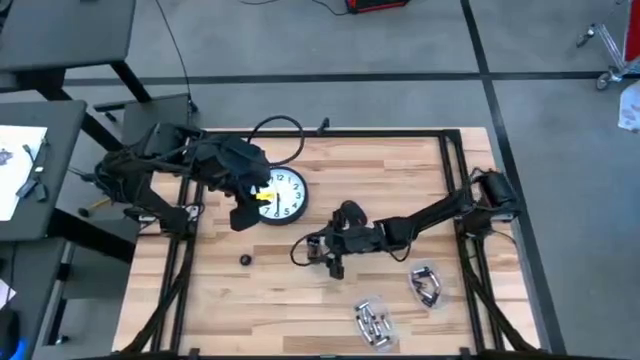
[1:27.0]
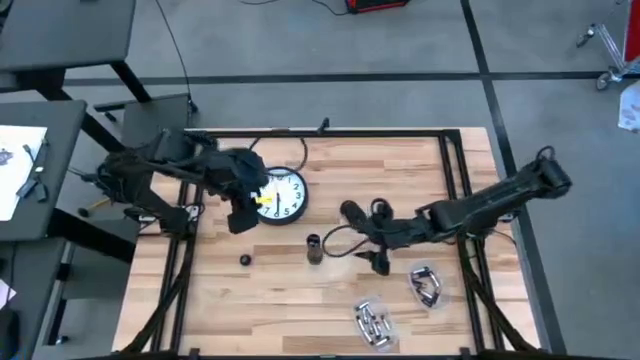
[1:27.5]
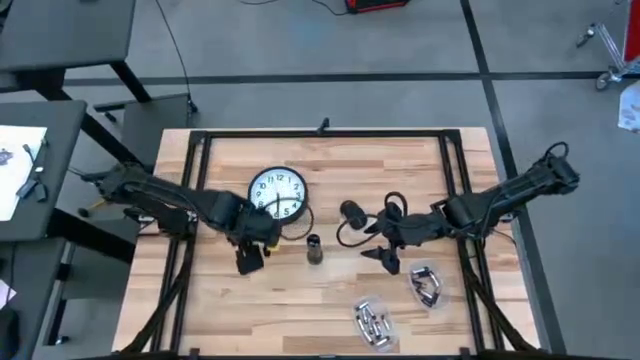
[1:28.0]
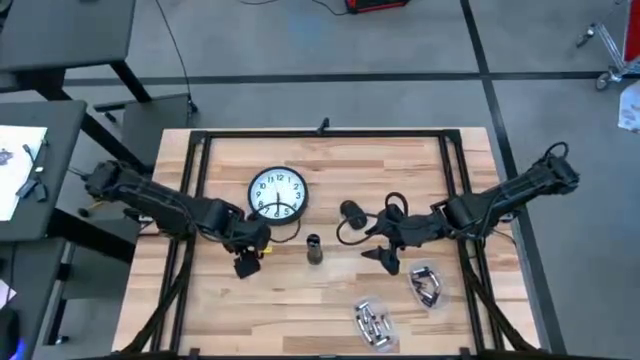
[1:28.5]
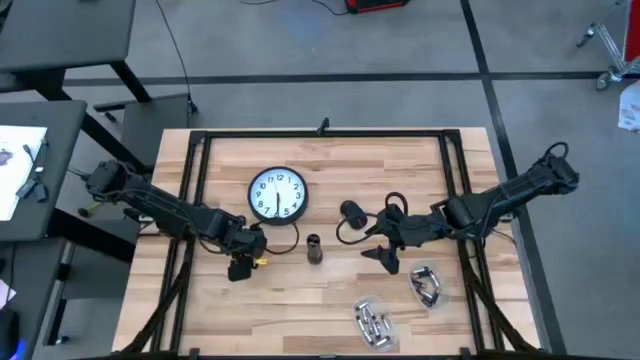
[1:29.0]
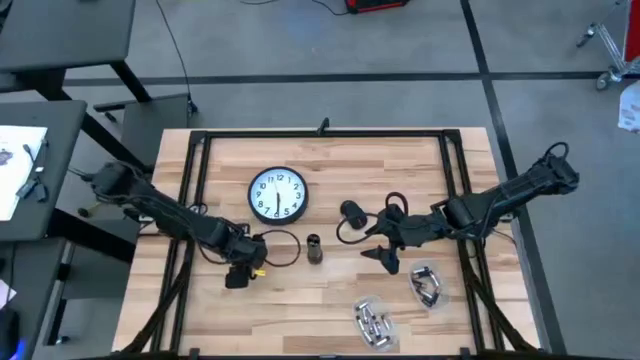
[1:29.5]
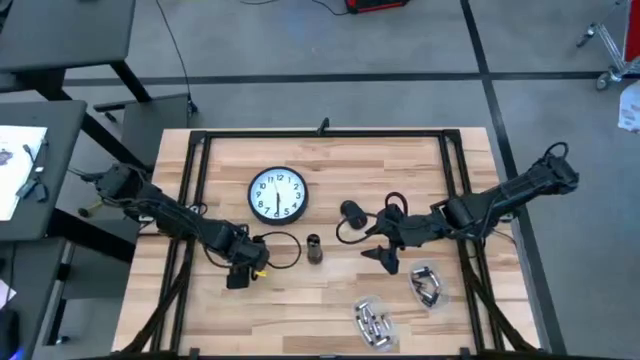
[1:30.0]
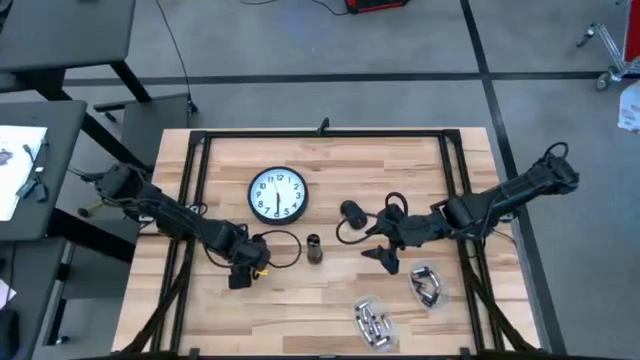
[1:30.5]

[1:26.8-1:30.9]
Task: Insert battery
Close the black flashlight battery compartment

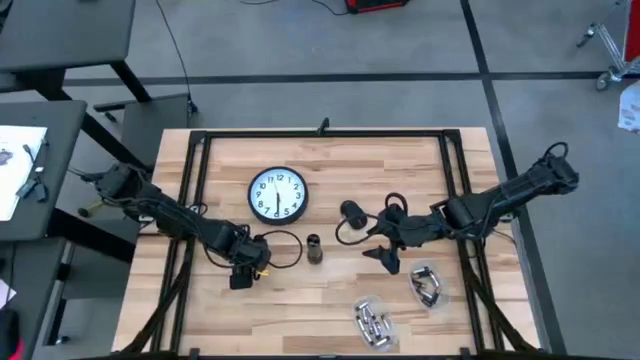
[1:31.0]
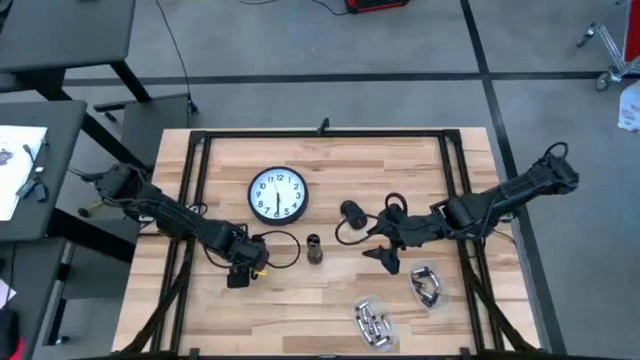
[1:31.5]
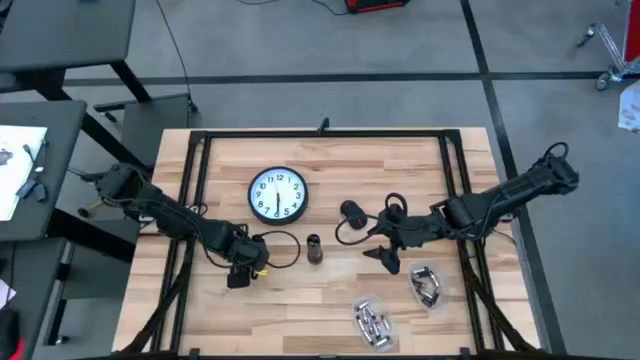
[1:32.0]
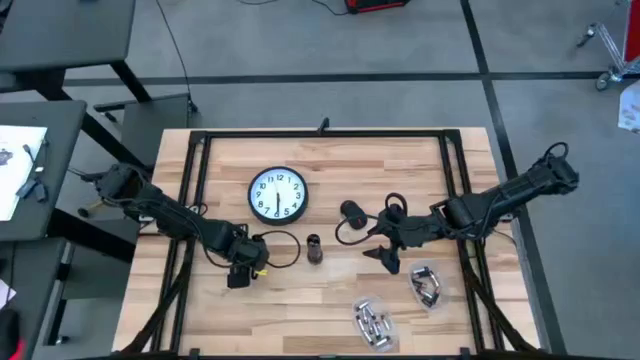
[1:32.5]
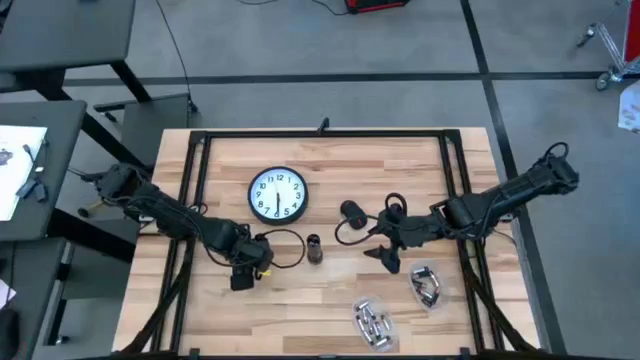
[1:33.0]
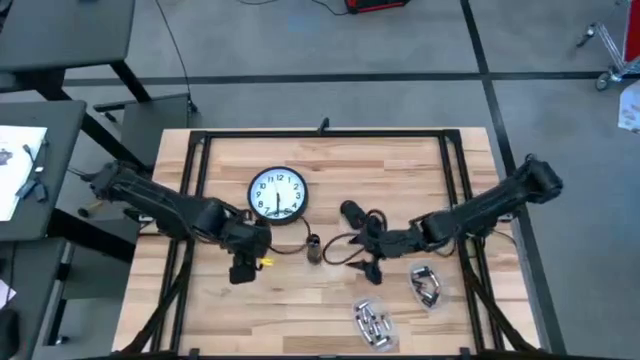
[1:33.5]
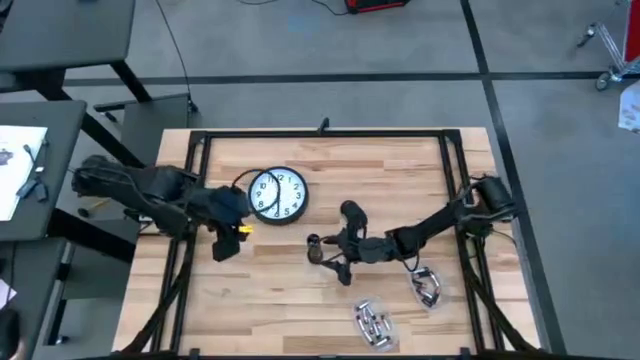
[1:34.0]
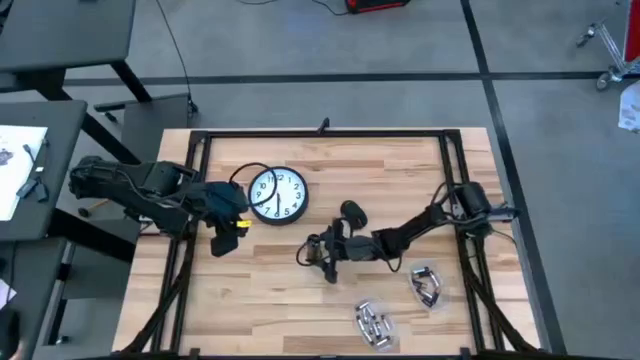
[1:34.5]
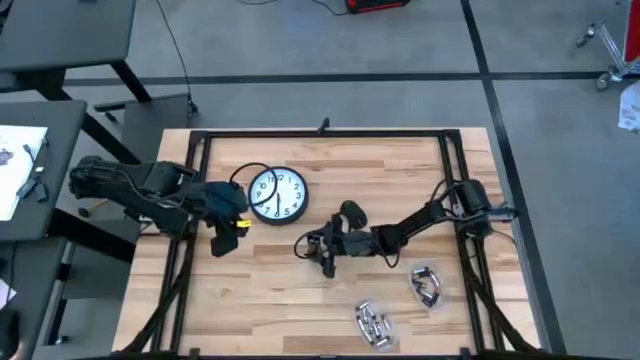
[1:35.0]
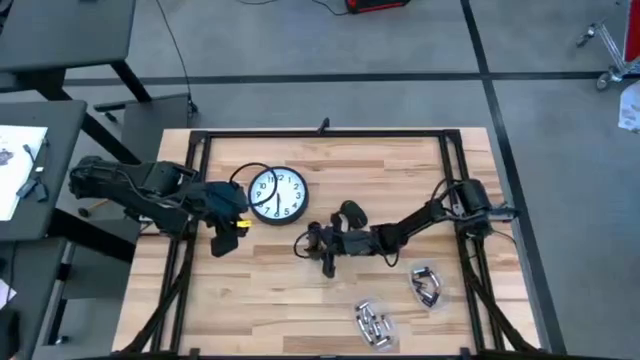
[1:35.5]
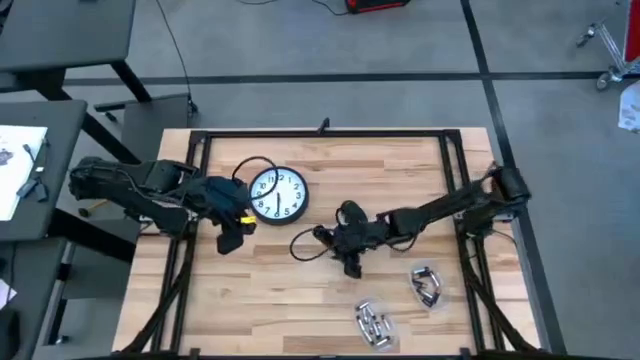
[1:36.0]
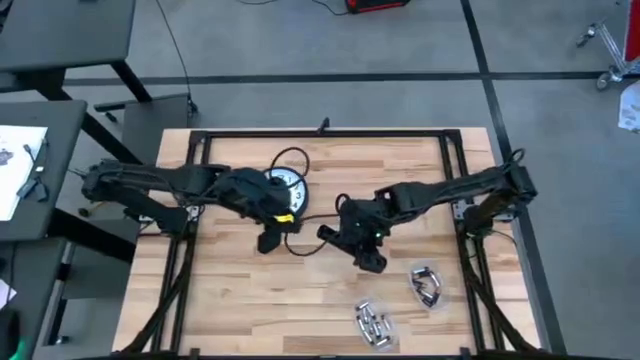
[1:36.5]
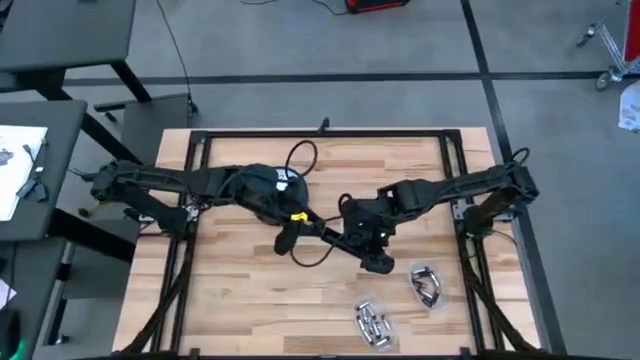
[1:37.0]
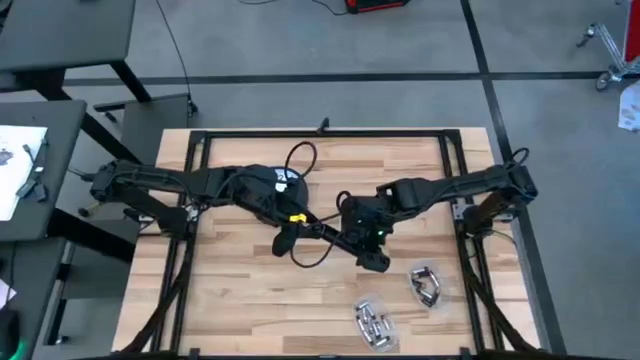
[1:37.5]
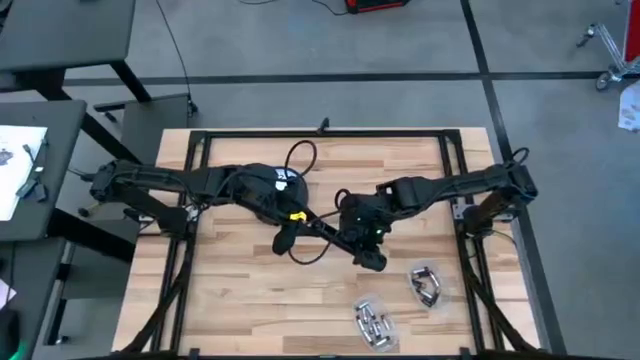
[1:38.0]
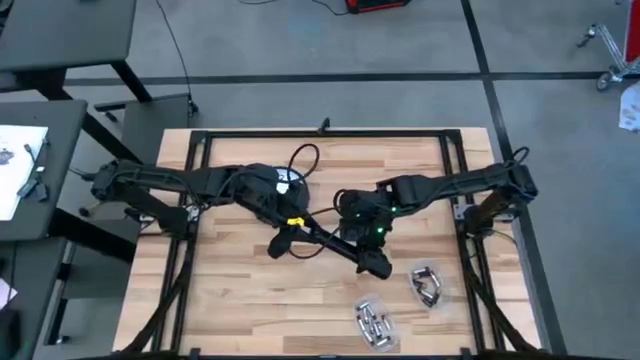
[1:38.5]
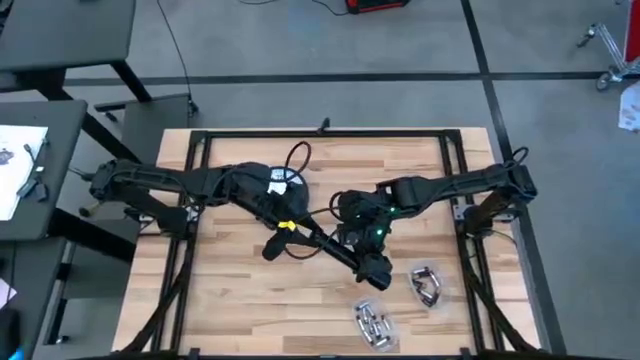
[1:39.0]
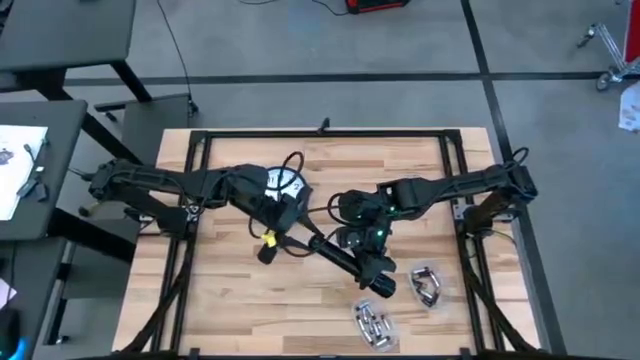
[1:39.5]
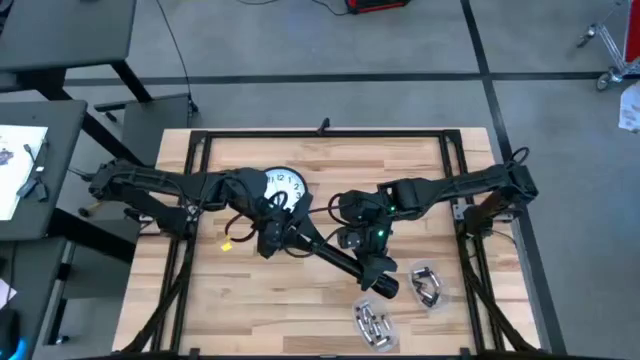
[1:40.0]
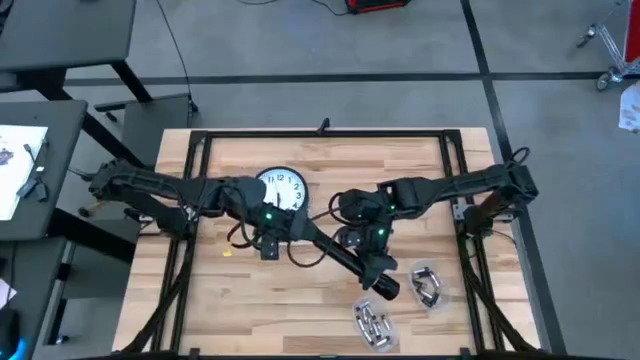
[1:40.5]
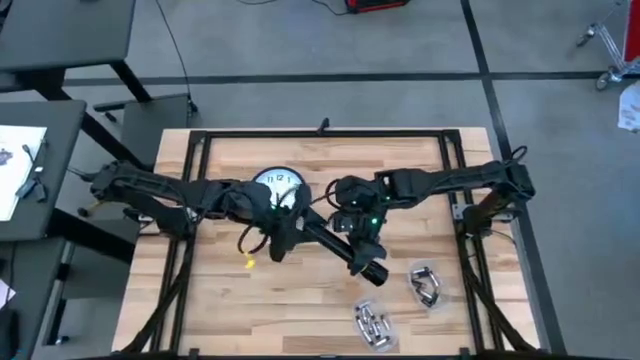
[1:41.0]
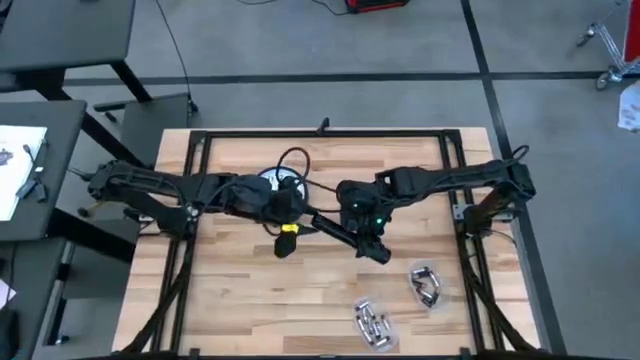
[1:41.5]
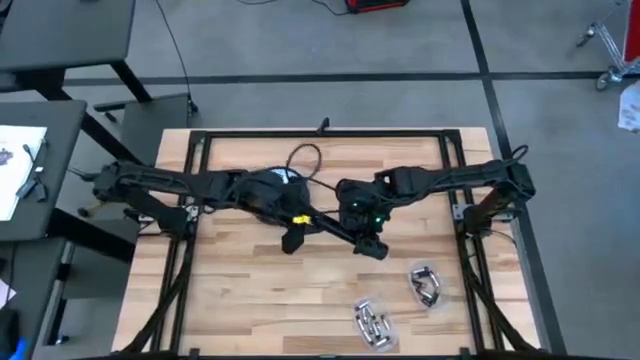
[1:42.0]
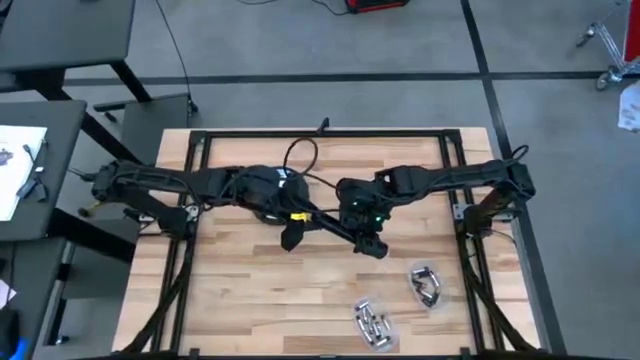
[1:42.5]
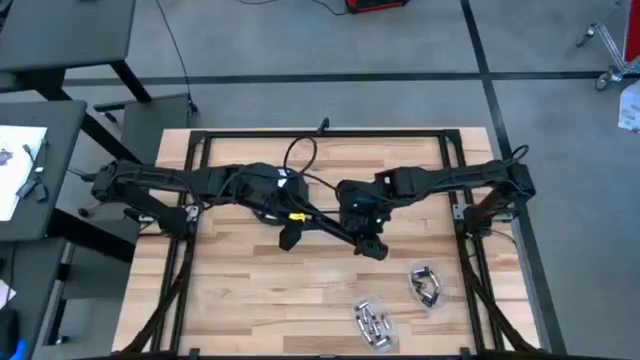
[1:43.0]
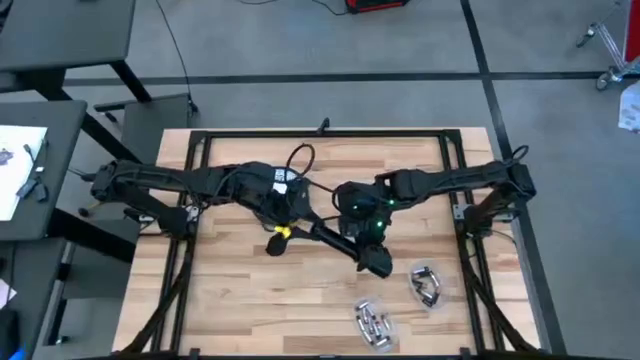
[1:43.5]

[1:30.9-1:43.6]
Close the black flashlight battery compartment

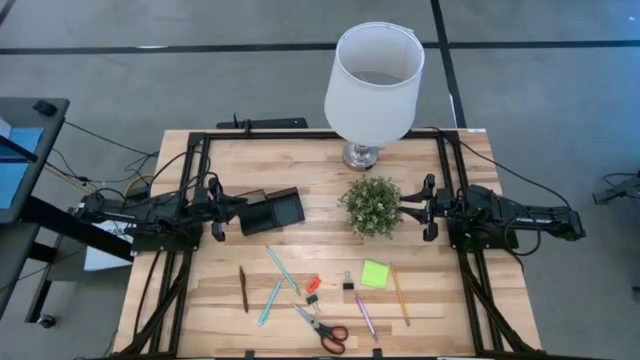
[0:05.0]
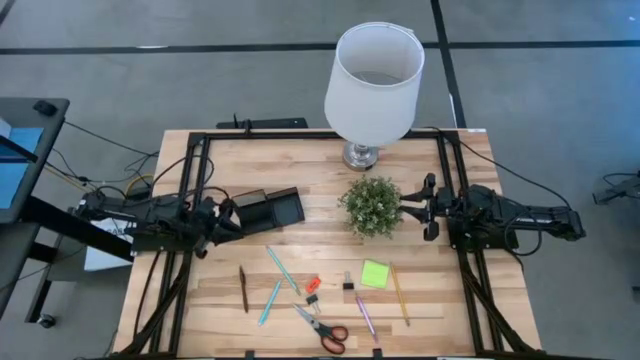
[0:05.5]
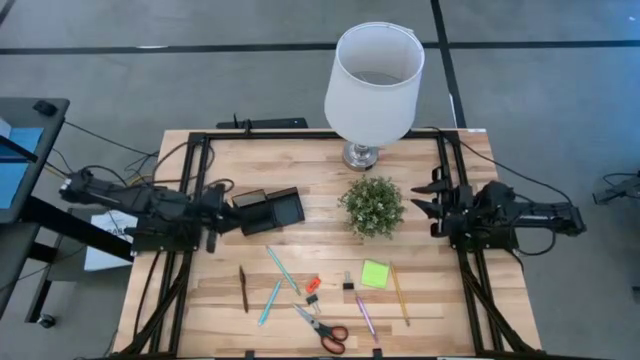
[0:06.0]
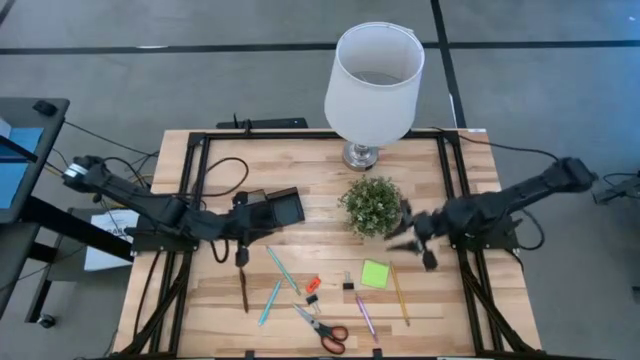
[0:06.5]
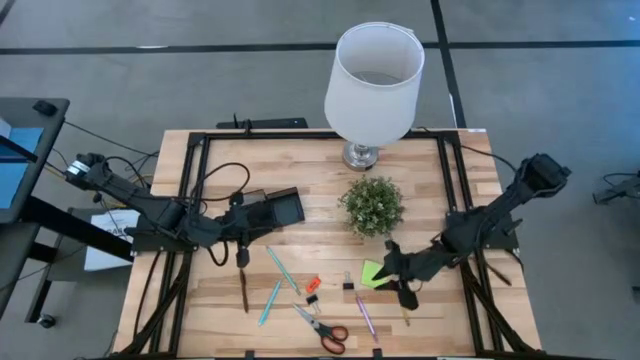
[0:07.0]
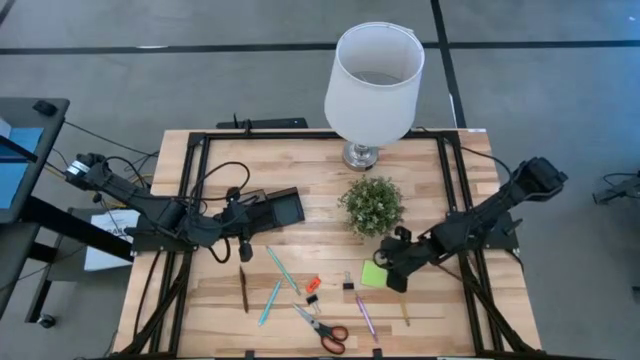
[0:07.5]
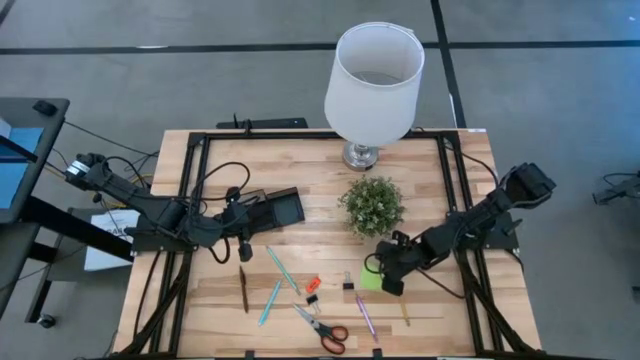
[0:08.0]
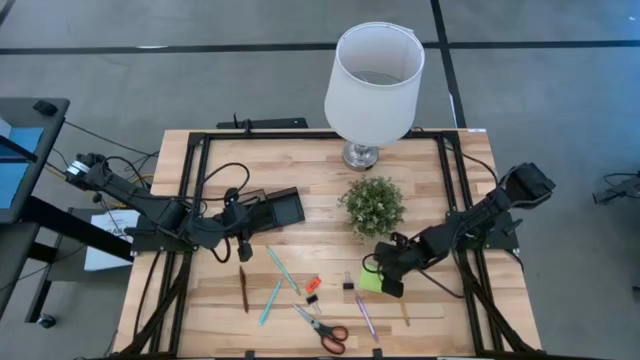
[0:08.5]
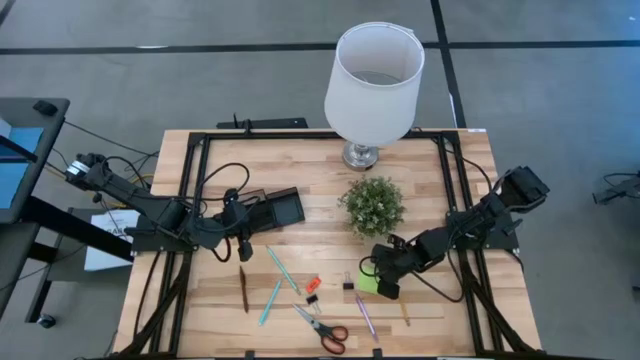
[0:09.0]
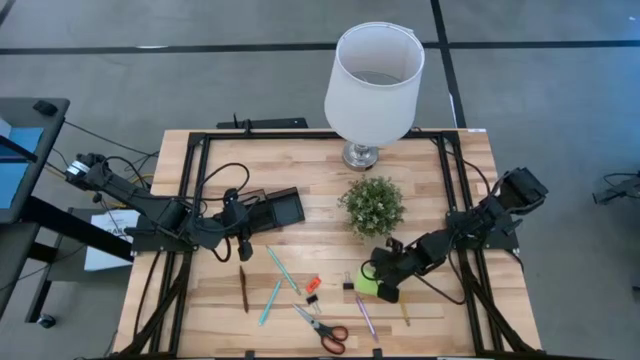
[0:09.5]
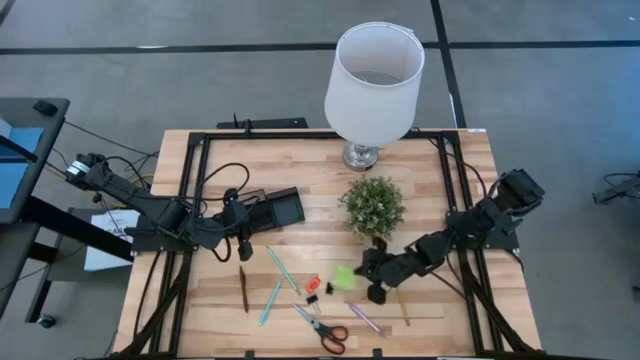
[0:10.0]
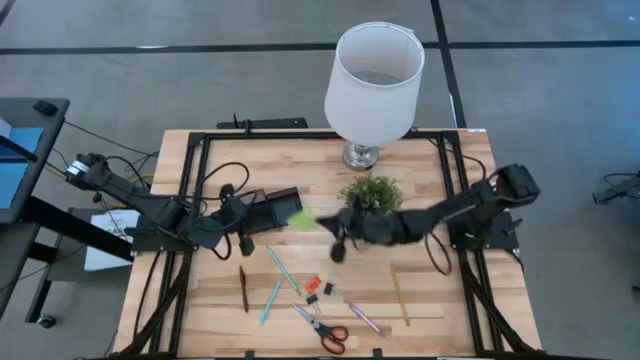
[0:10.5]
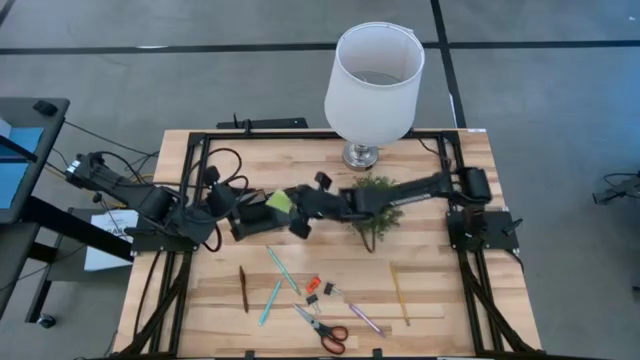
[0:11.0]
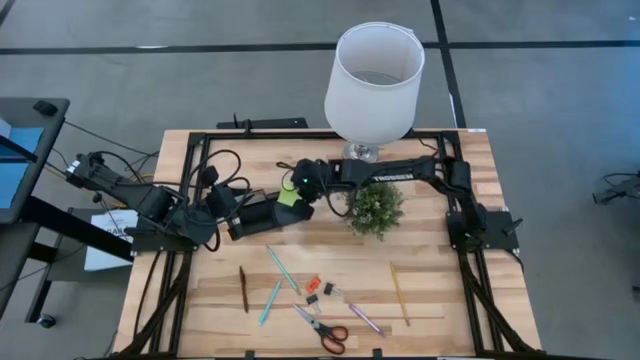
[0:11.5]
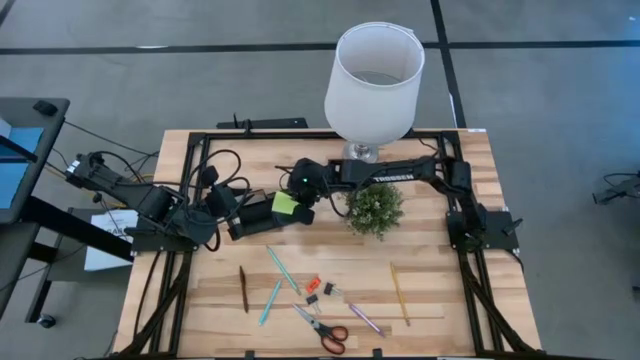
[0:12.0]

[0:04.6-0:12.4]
Task: Pick and place office supplies into organizer
Put the green sticky note into the black desk organizer
